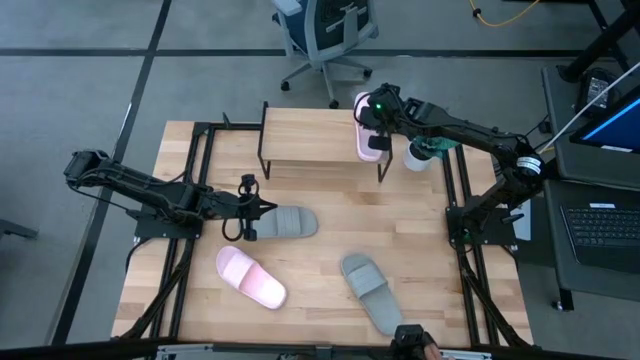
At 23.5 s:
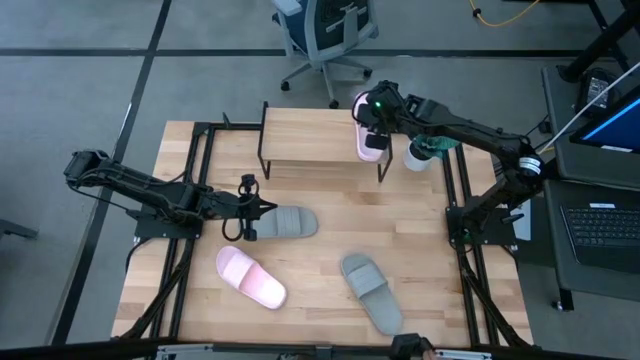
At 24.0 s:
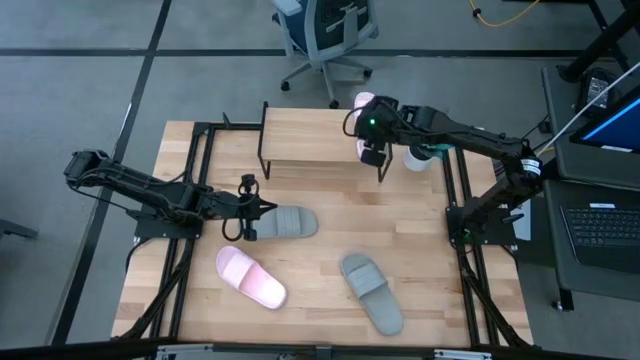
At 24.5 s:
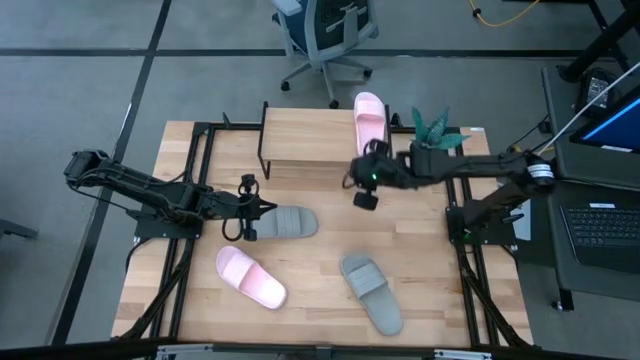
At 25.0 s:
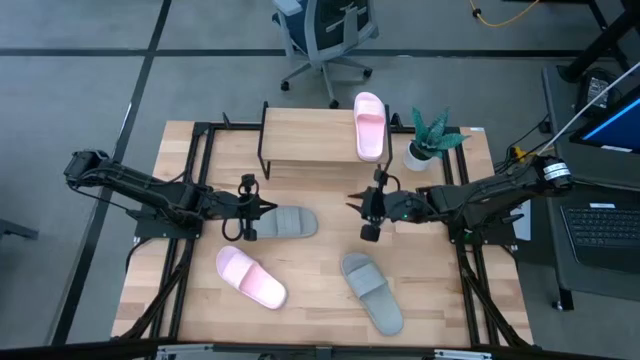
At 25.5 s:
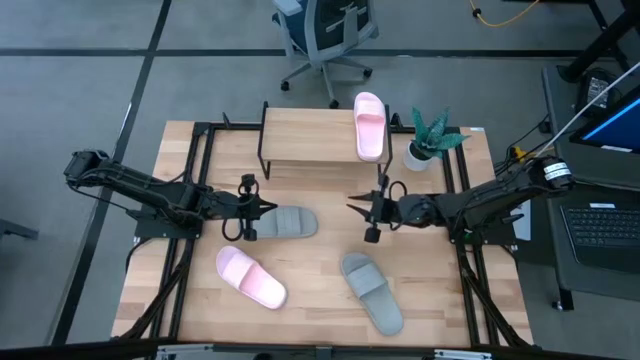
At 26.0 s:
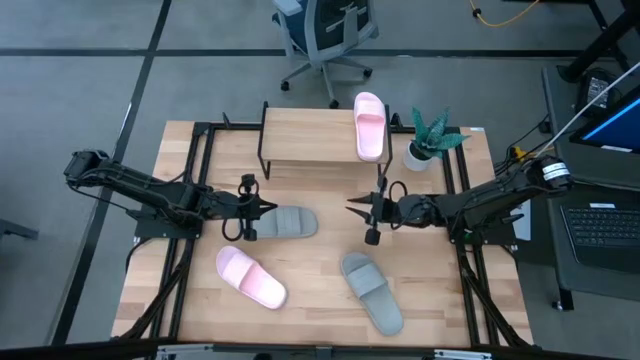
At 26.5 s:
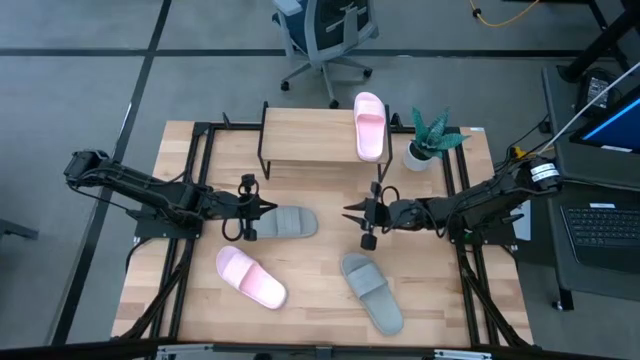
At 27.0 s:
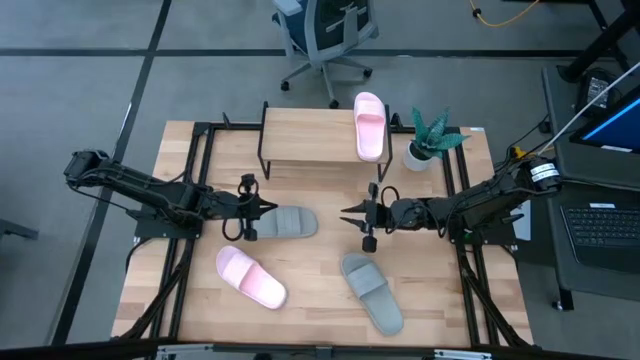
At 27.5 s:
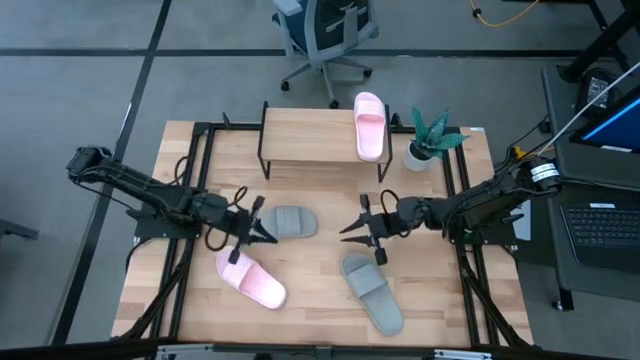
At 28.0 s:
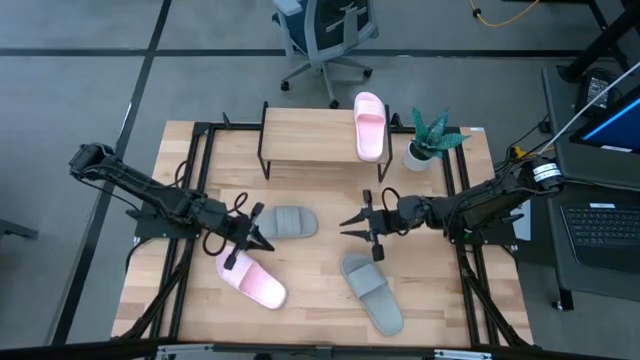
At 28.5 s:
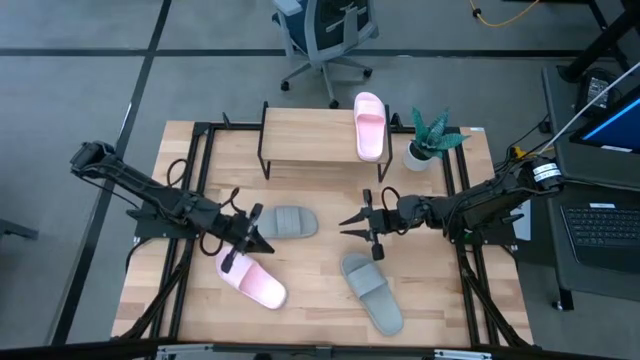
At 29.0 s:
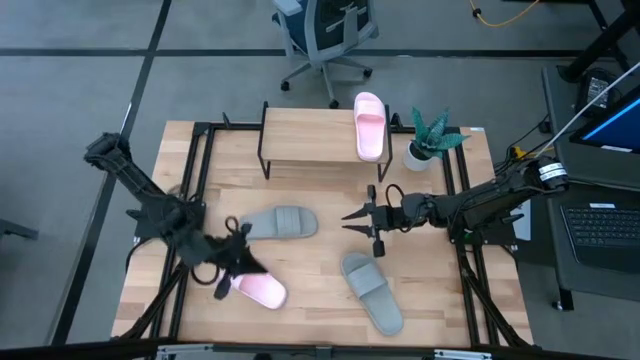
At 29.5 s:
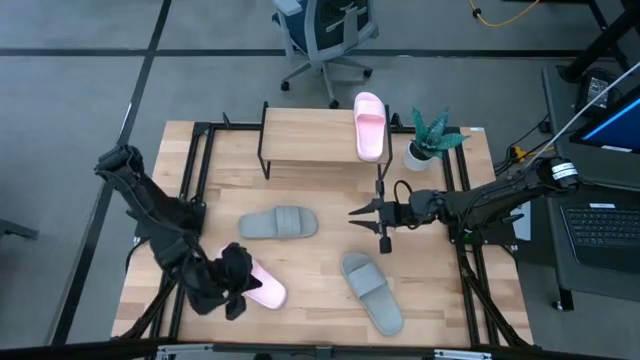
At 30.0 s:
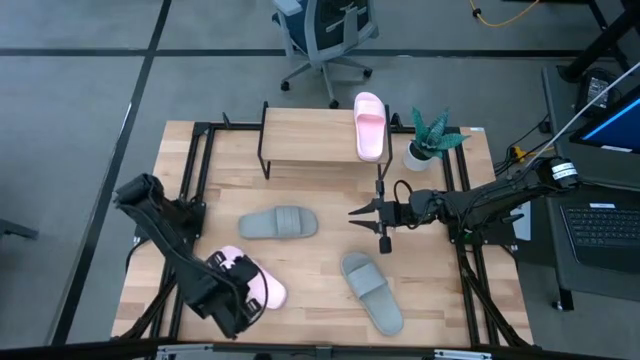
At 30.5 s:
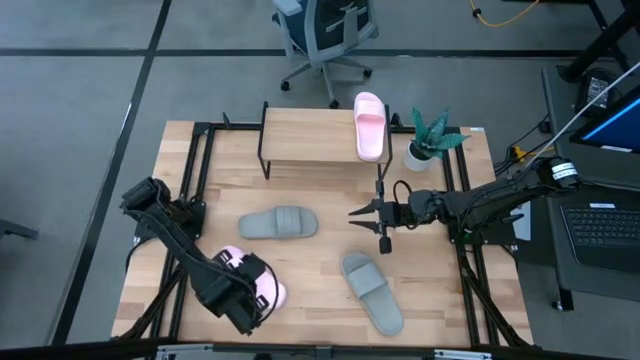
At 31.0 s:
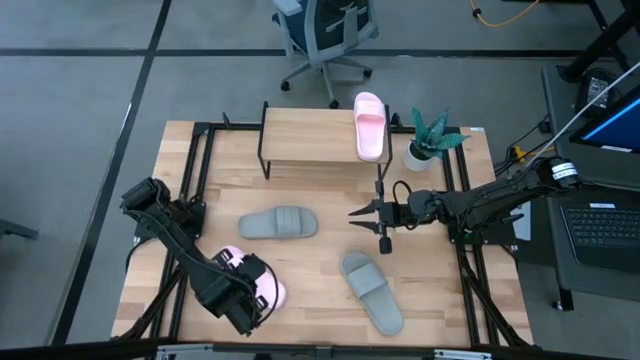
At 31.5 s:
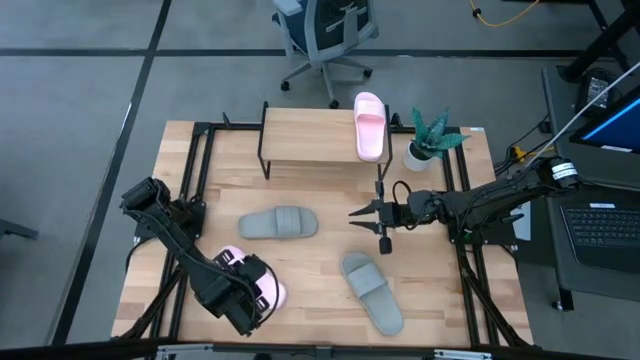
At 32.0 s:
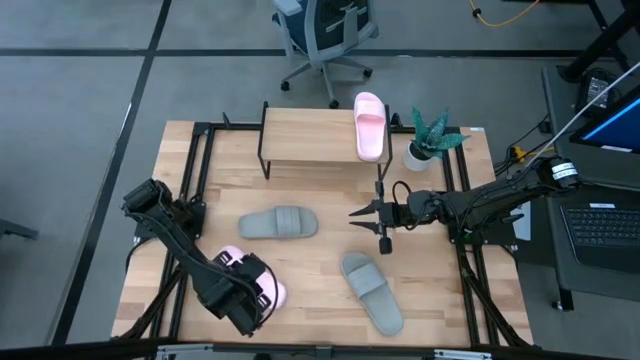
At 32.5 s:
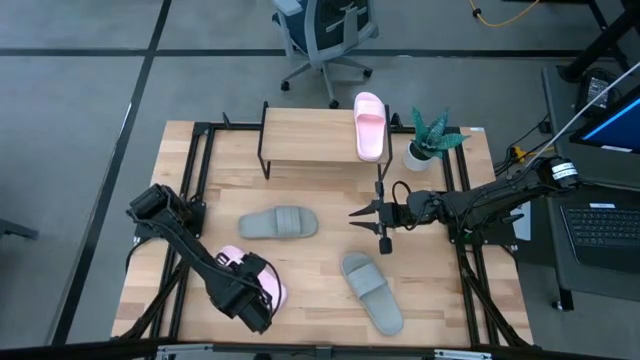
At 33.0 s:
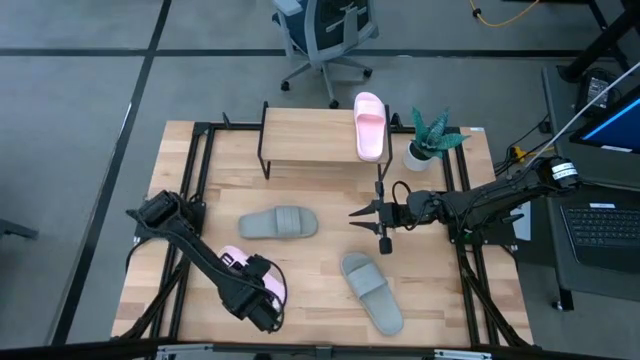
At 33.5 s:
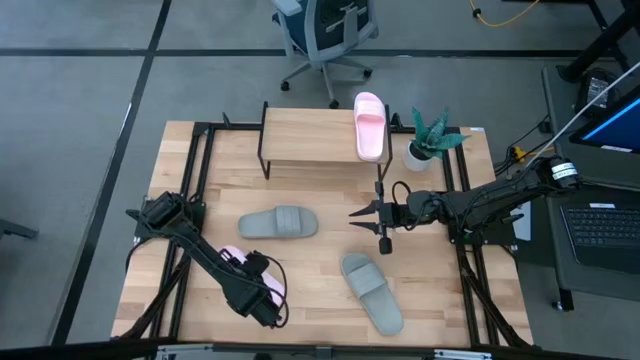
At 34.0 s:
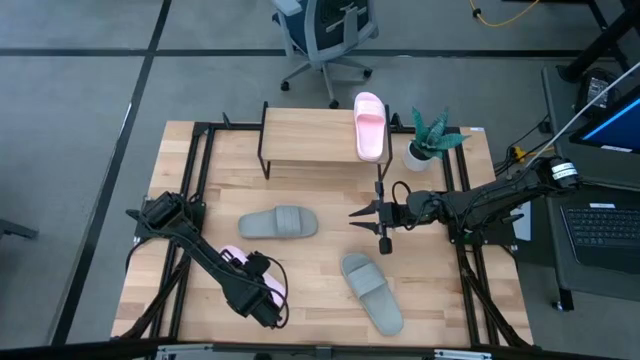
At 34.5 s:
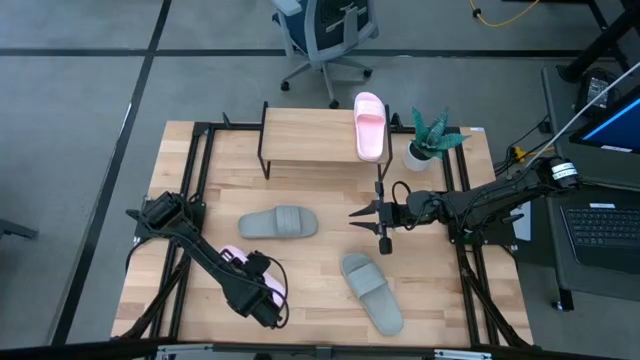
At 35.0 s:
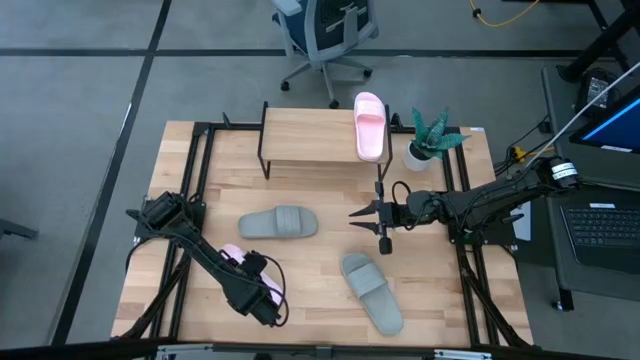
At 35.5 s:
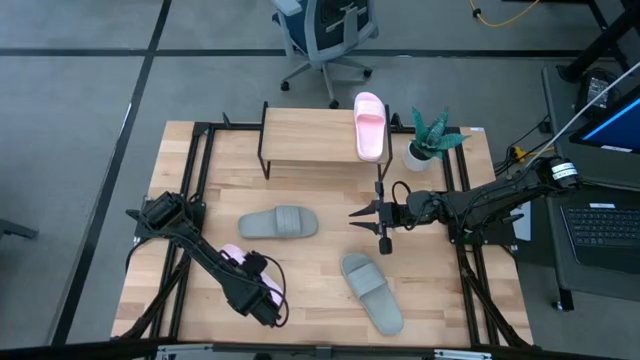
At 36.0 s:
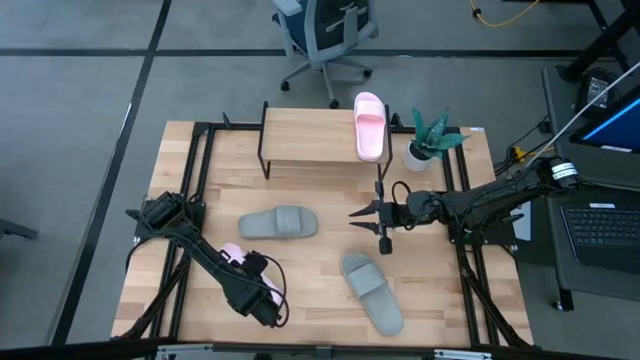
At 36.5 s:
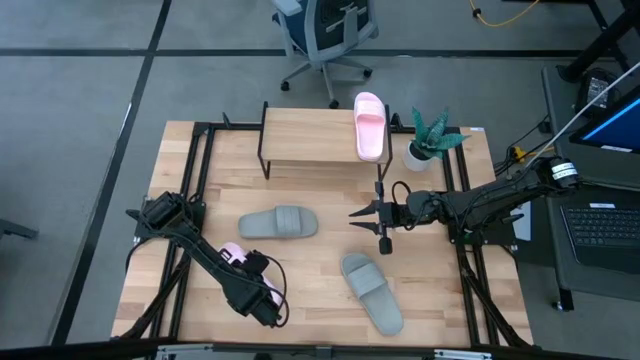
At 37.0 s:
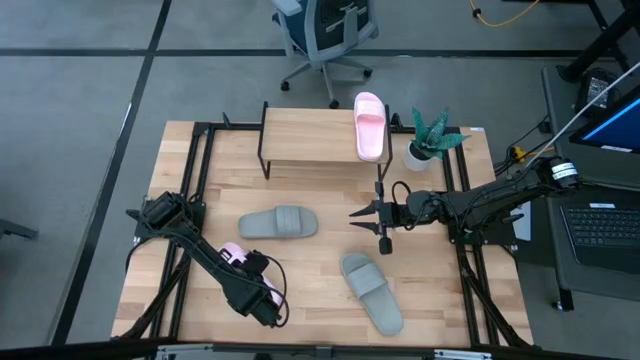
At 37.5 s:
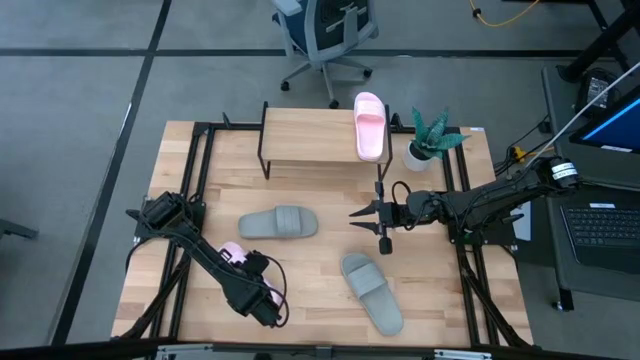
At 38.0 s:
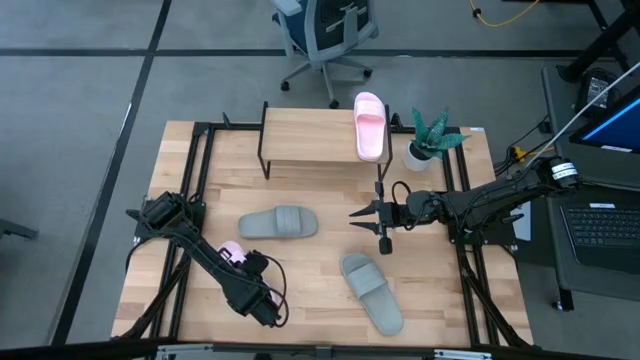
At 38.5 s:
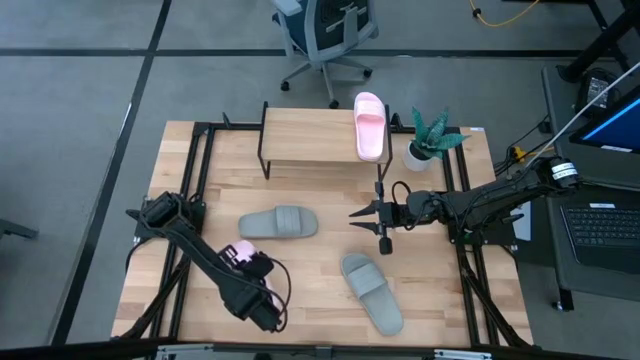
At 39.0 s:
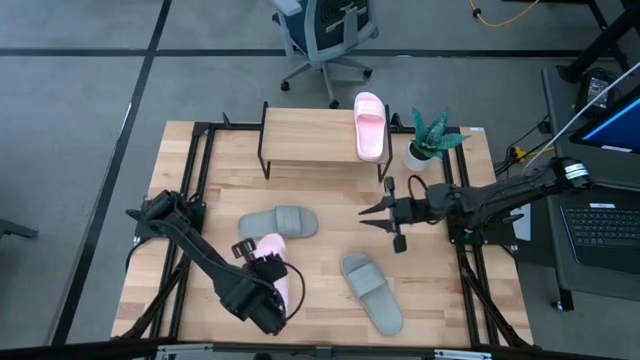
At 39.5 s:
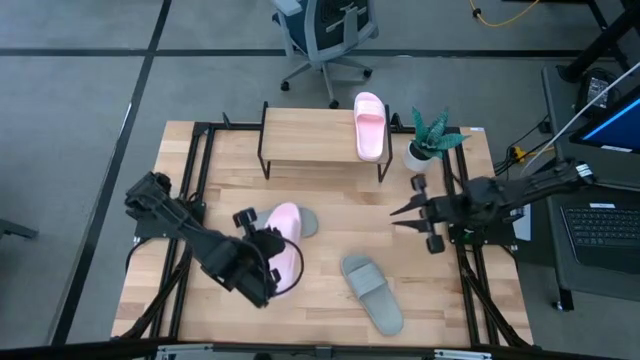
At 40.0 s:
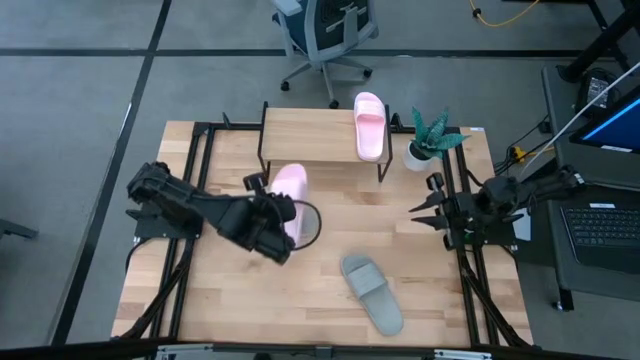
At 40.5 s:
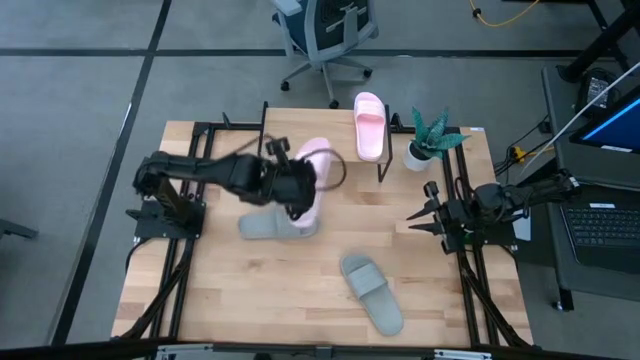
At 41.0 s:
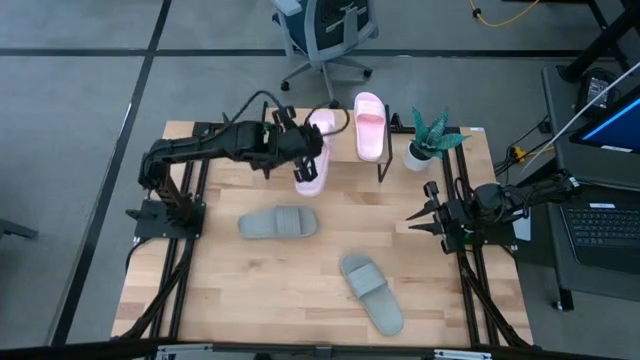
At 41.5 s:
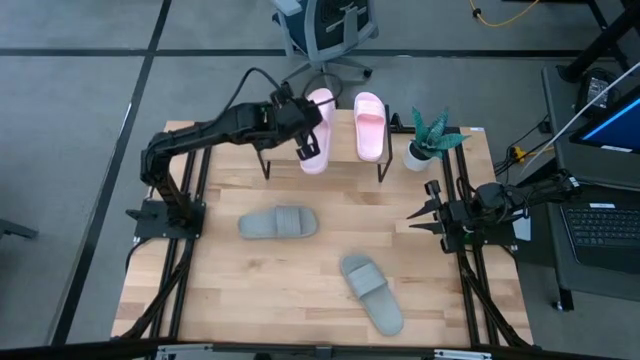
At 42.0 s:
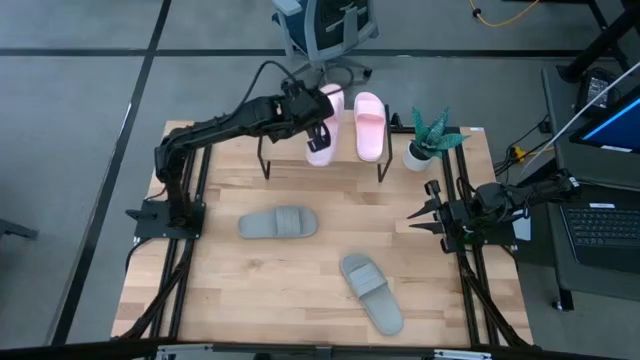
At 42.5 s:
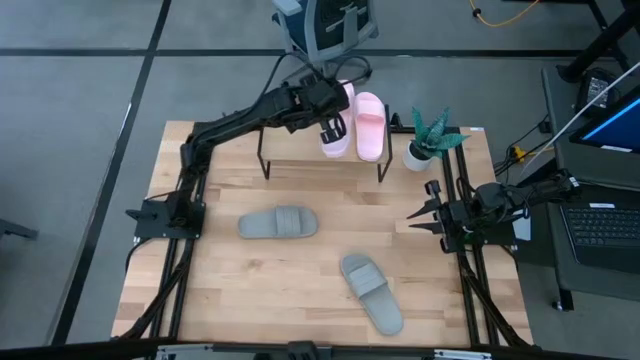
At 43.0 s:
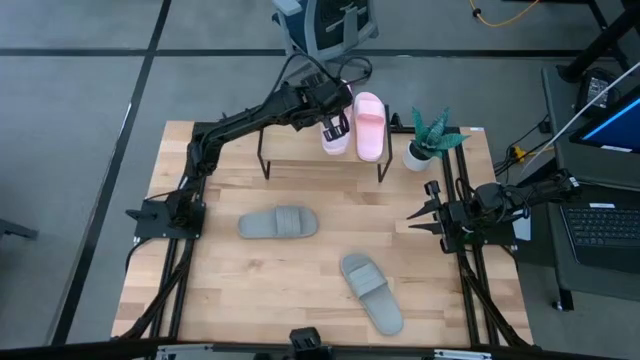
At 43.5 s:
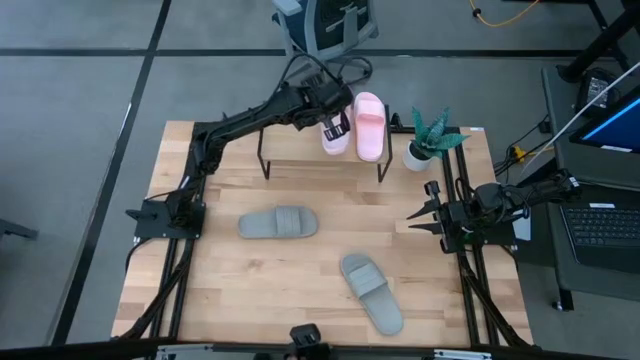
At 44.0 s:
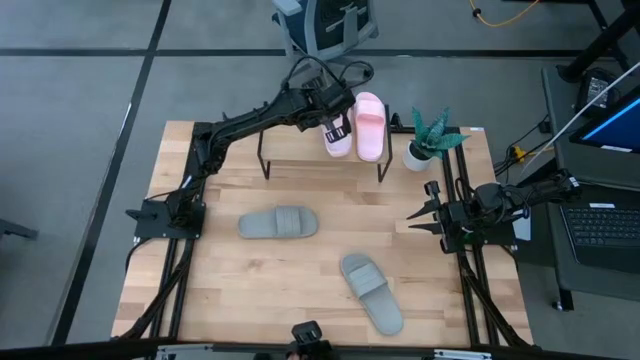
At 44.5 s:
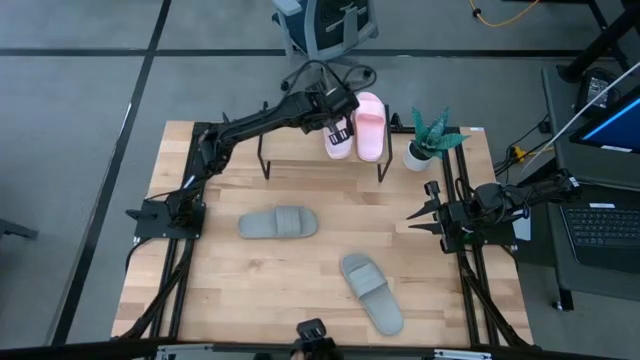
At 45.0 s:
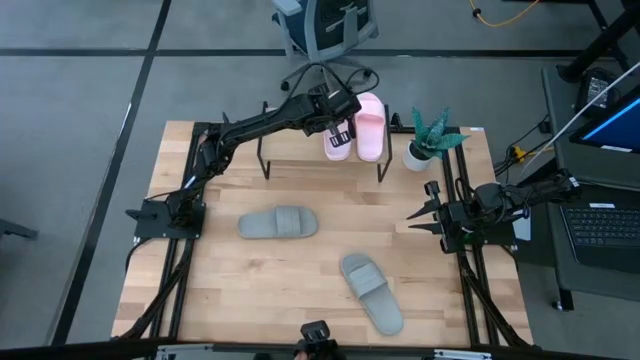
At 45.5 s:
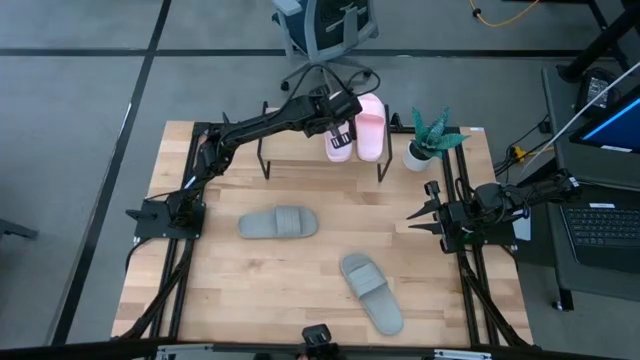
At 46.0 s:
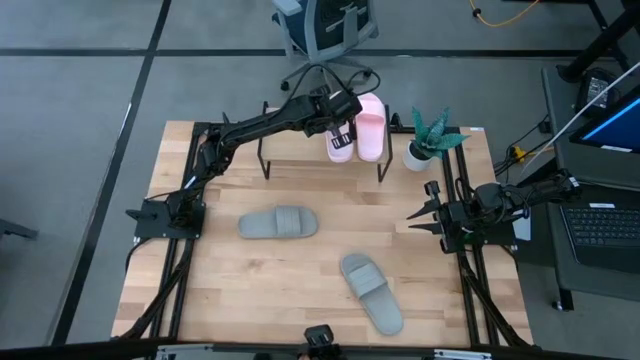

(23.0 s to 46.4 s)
Task: Pick and place slides into the shelf
Put the pink slipper on the shelf
